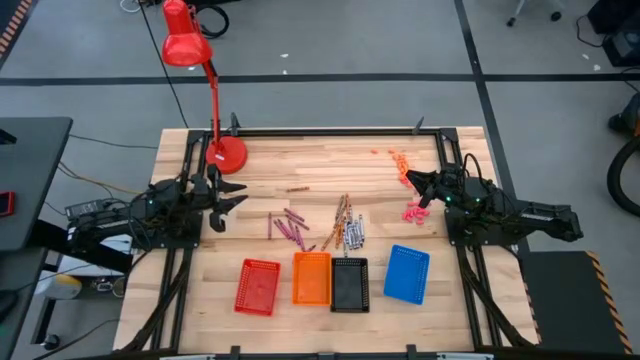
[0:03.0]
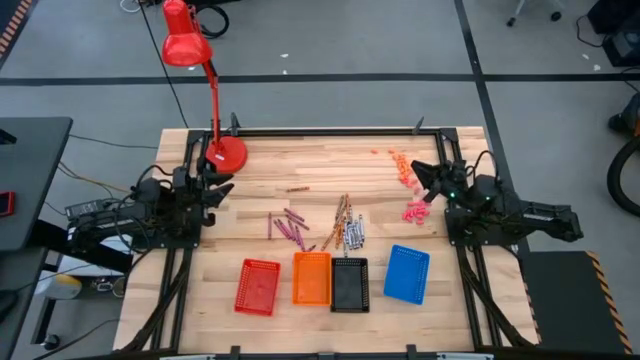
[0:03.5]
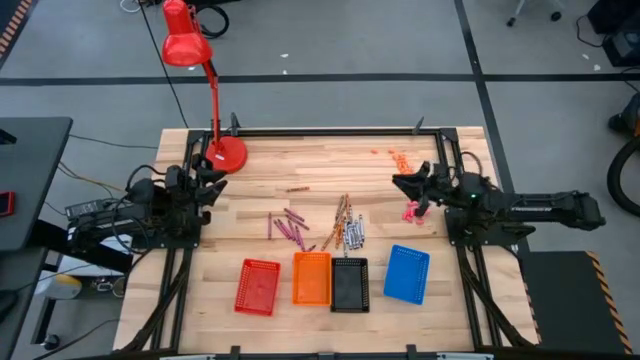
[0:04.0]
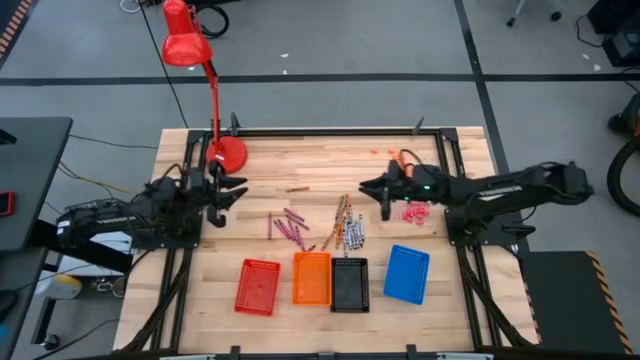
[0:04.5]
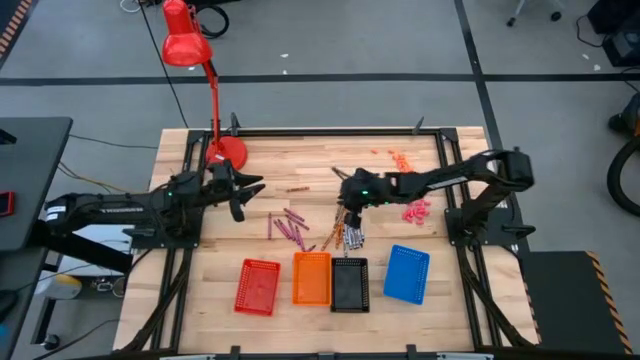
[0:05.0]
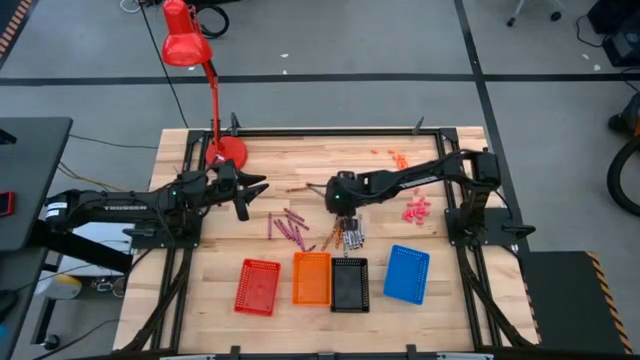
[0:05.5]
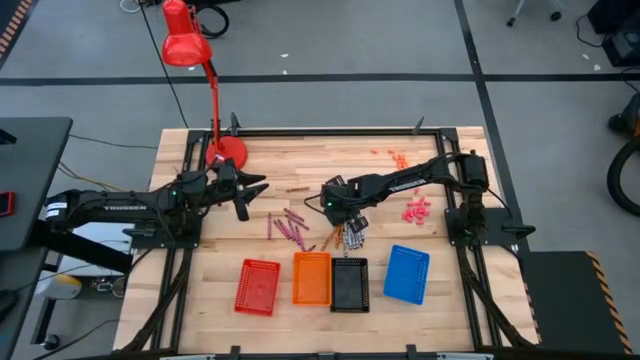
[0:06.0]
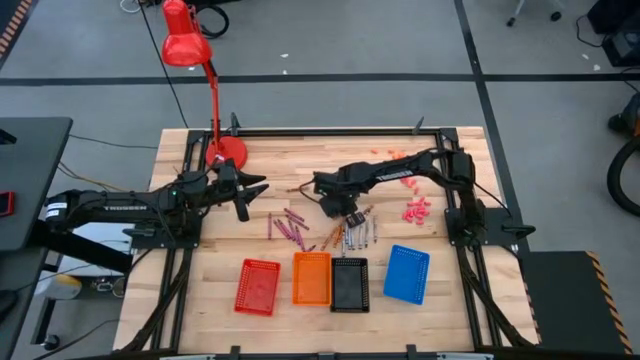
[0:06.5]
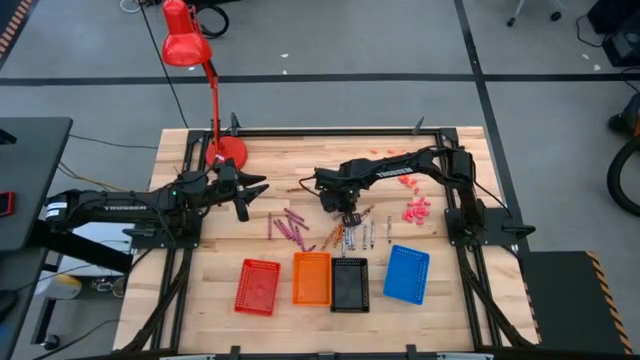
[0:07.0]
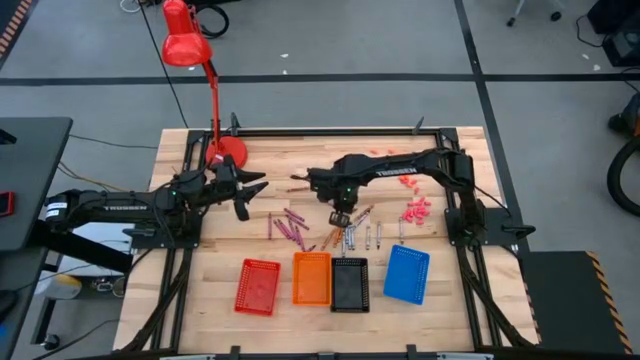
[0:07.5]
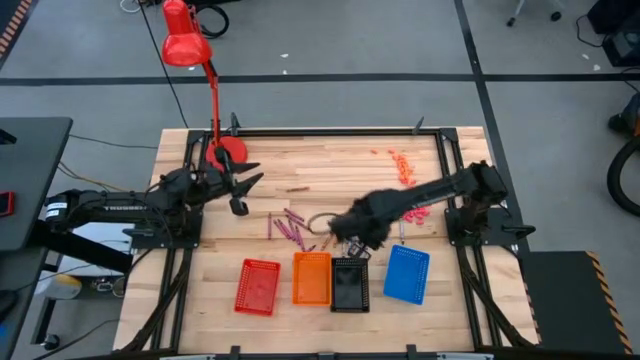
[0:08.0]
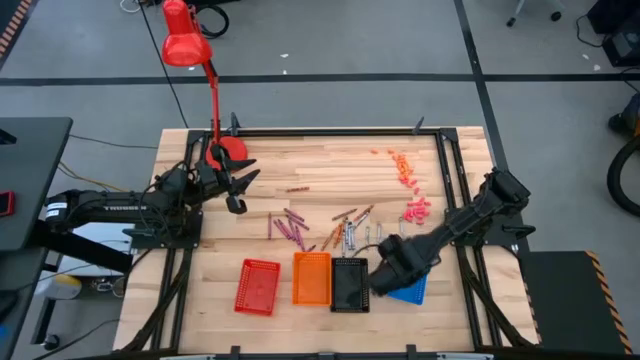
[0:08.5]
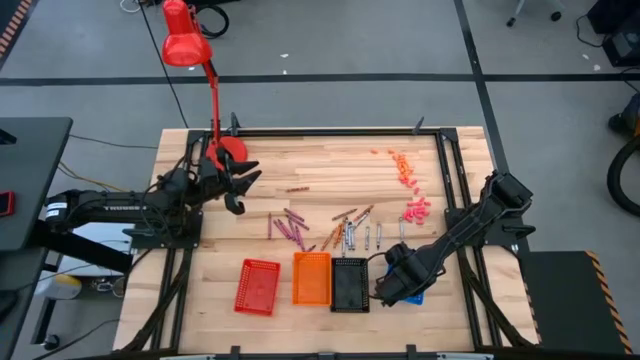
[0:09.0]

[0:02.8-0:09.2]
Task: Sort crayons
Put the brown crayon into the blue bin

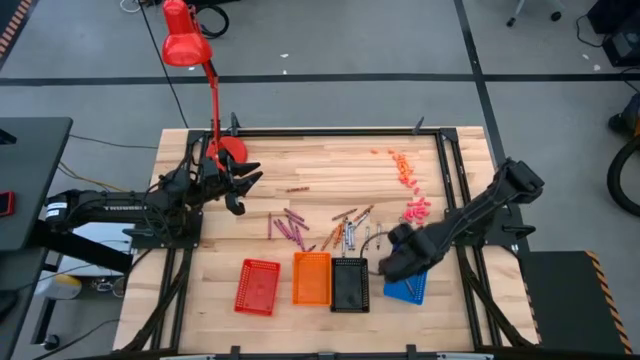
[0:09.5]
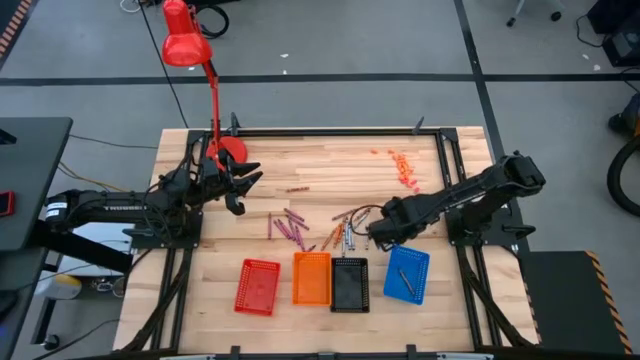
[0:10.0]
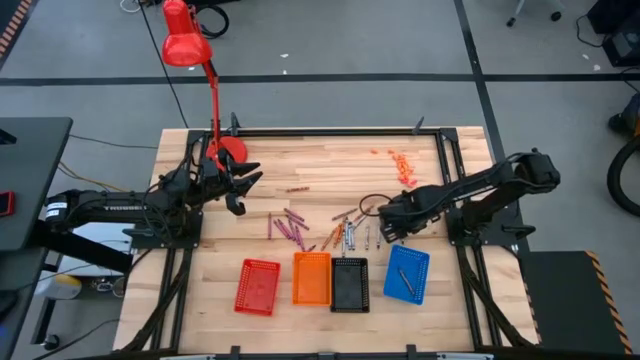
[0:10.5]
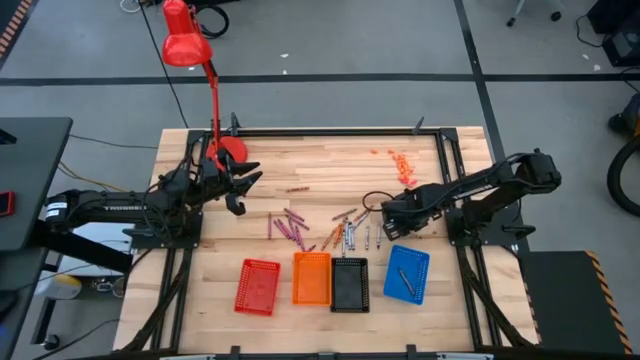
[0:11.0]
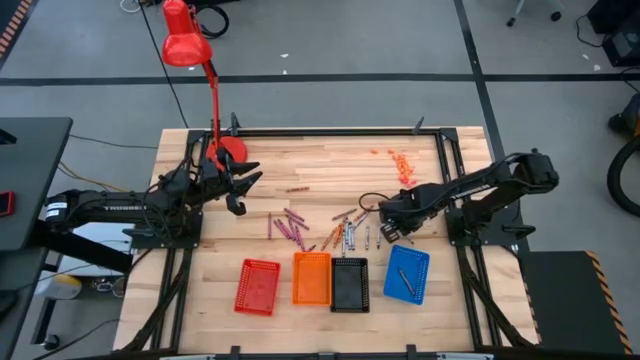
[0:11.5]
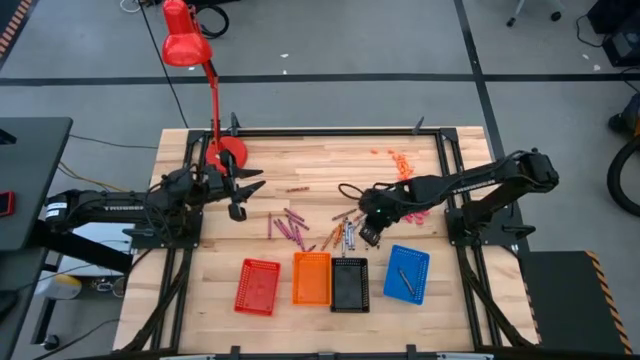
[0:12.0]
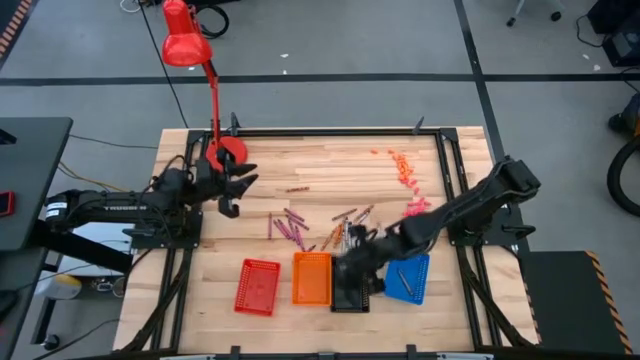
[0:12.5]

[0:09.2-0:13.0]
Put the black crayon into the black bin

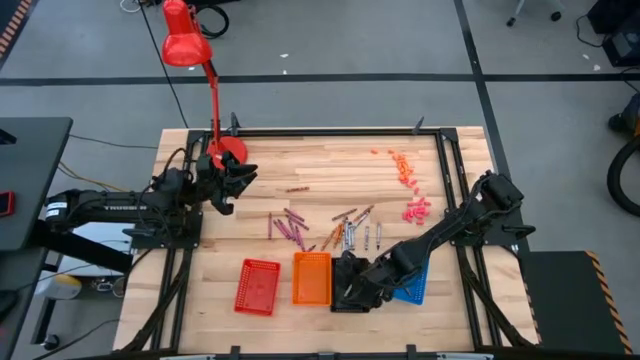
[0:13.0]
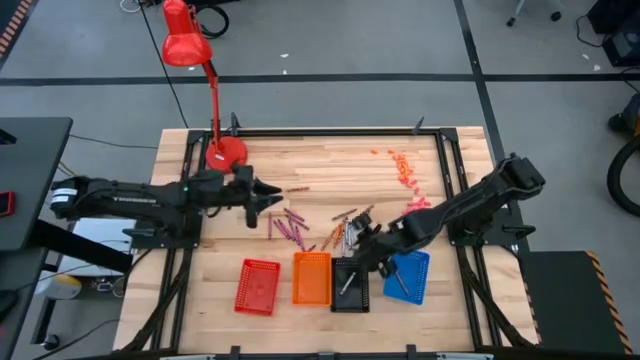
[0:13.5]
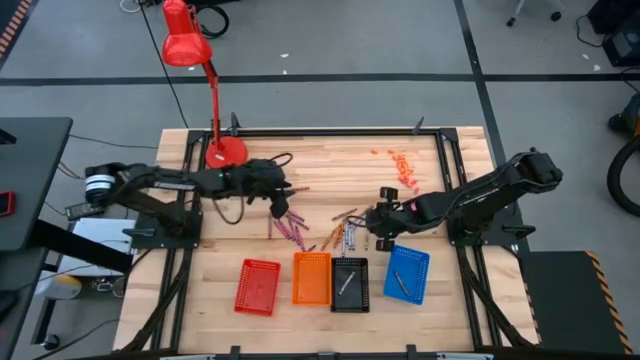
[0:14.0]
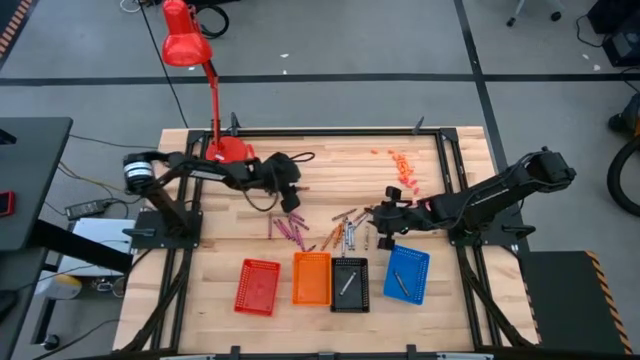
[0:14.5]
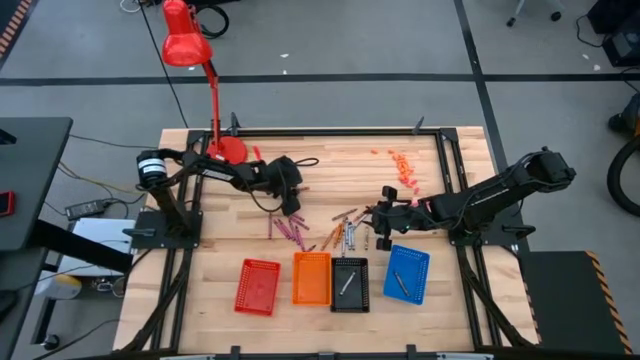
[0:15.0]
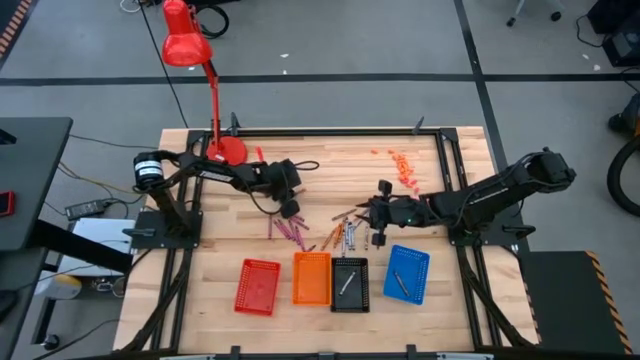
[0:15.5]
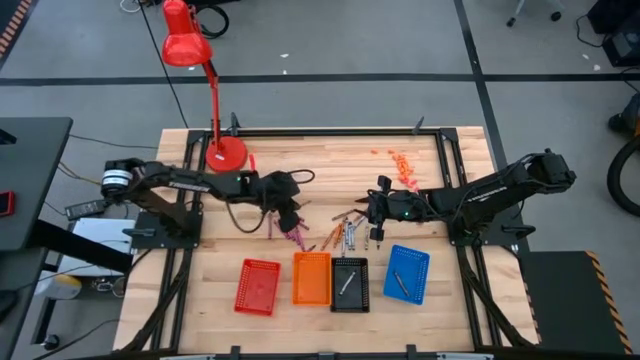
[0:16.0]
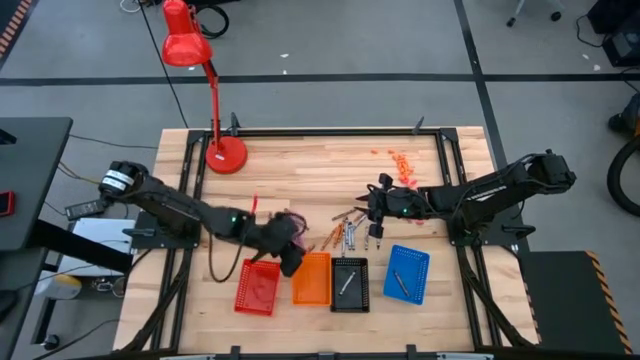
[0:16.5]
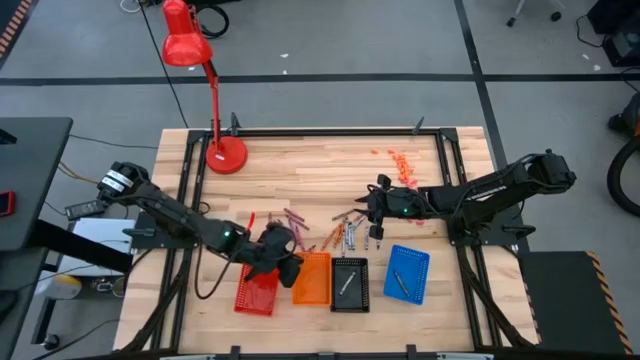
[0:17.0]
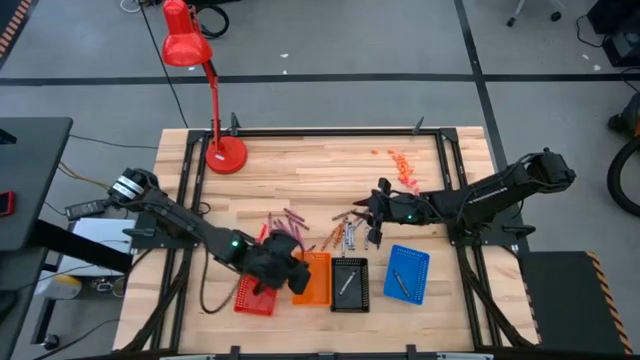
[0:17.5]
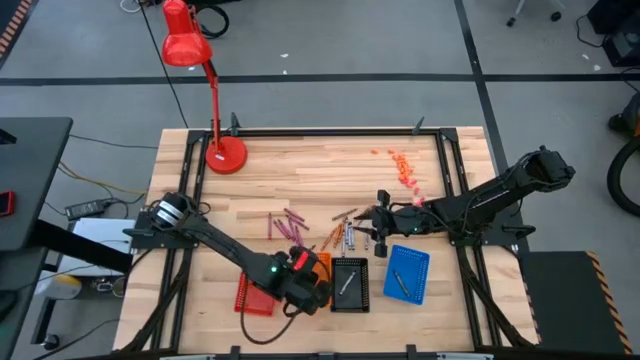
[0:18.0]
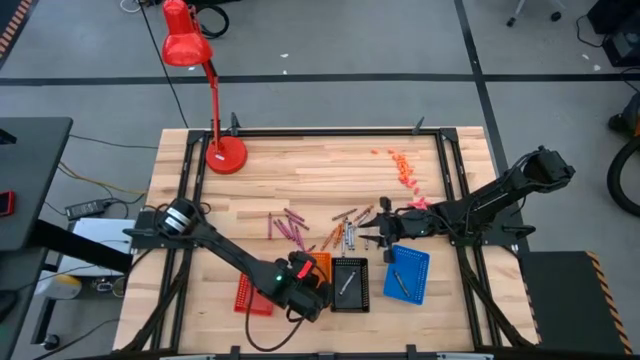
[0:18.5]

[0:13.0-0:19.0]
Put the orange crayon into the orange bin

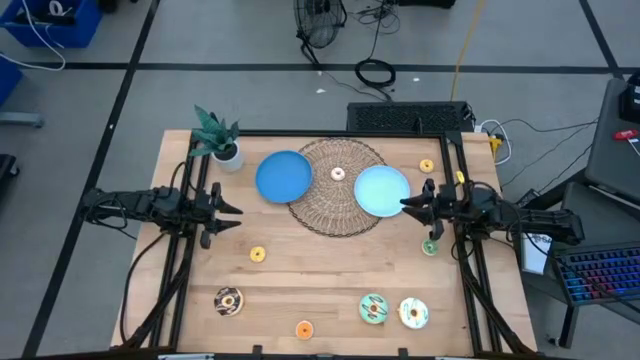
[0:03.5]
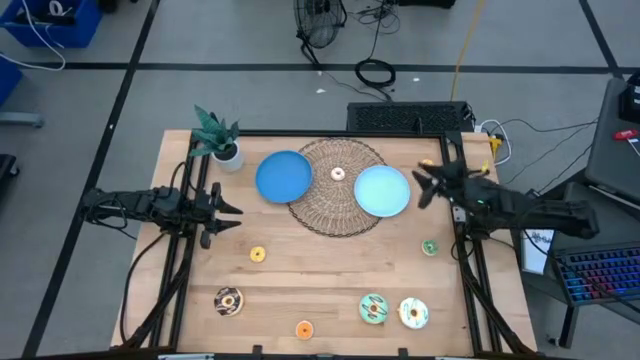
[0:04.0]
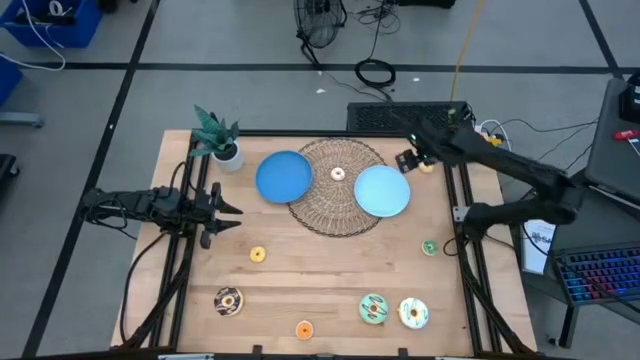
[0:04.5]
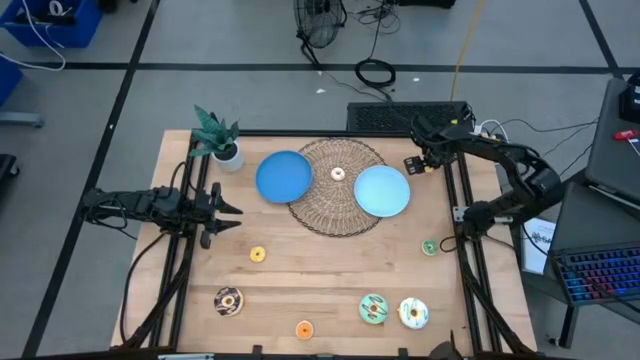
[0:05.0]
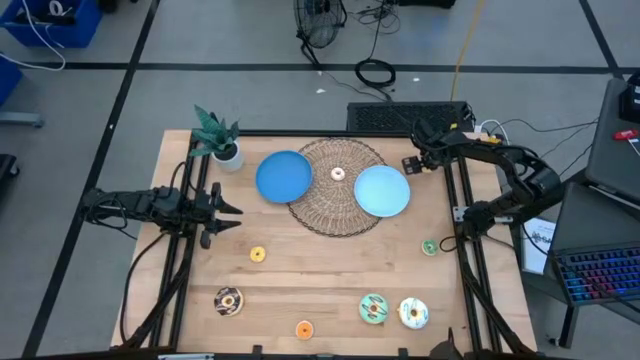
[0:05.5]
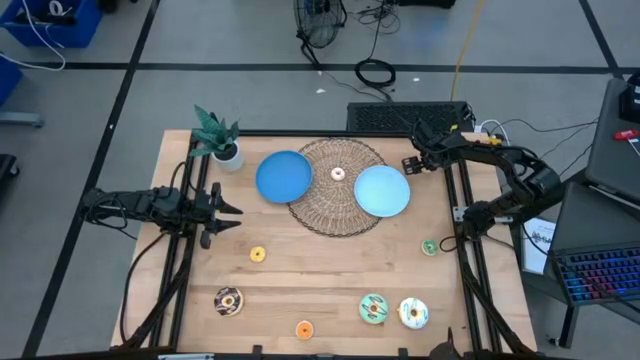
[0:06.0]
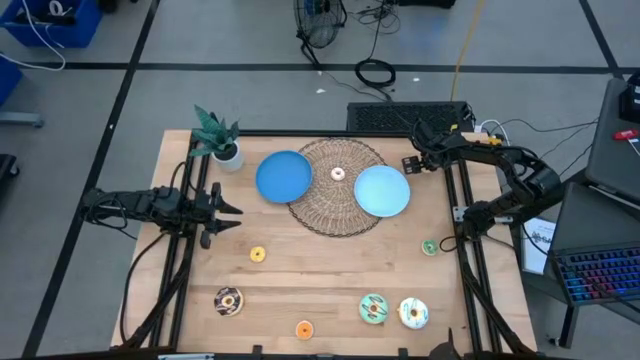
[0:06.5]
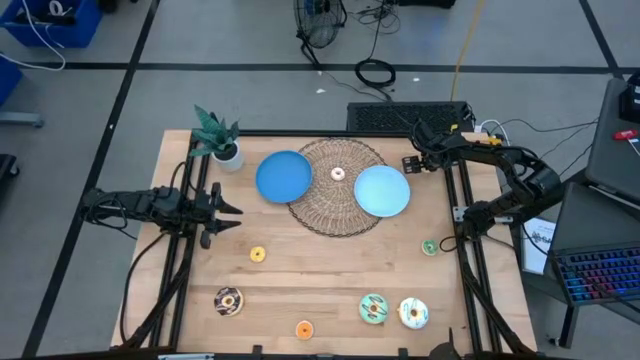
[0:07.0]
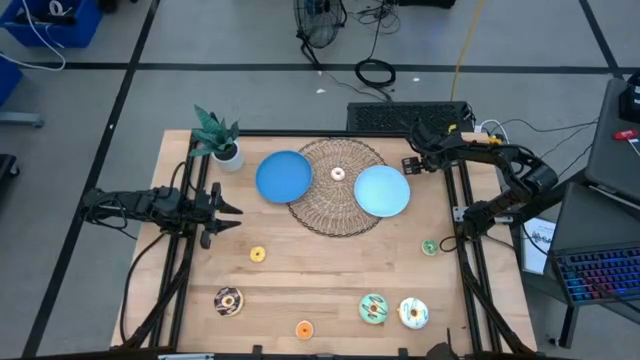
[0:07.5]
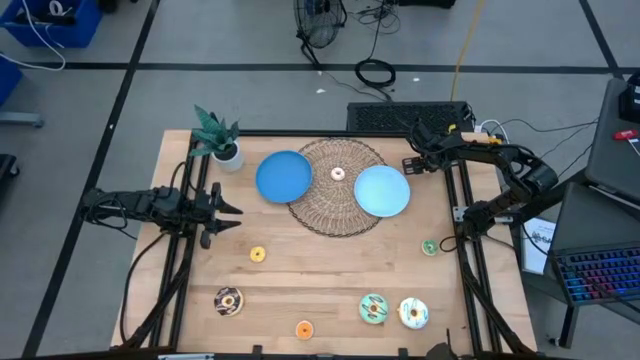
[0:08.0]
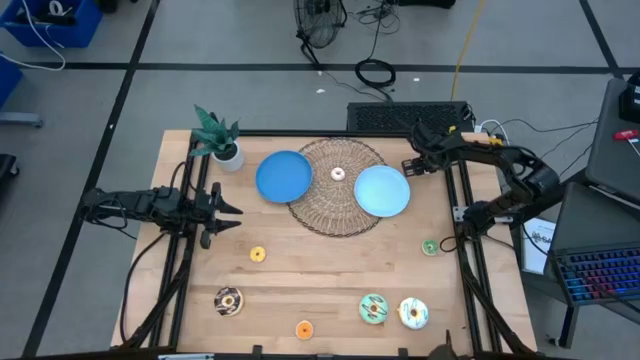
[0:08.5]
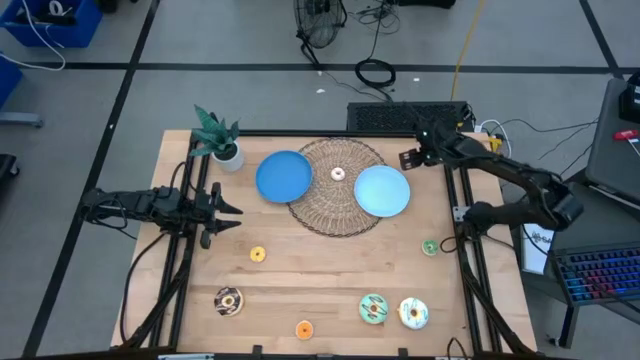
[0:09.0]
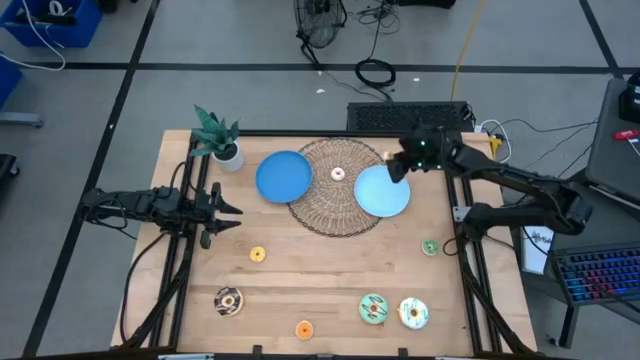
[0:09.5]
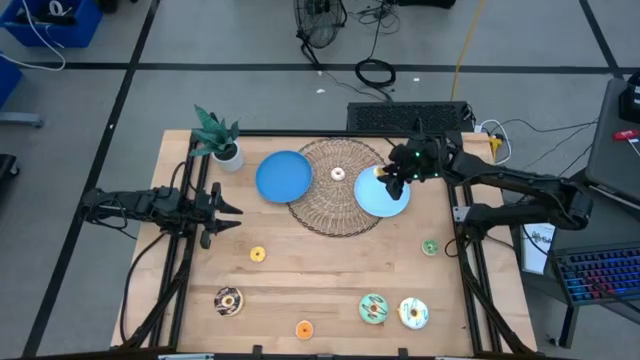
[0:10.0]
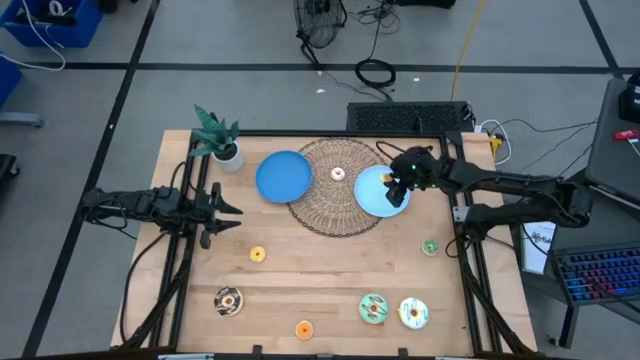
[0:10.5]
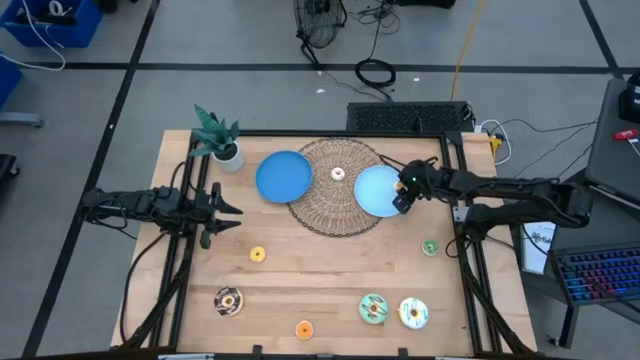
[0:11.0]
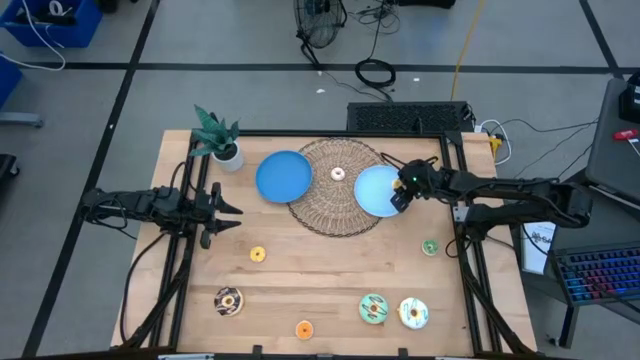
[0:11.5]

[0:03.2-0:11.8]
Task: Pick & Place donuts
Put the small yellow donut on the light blue plate
